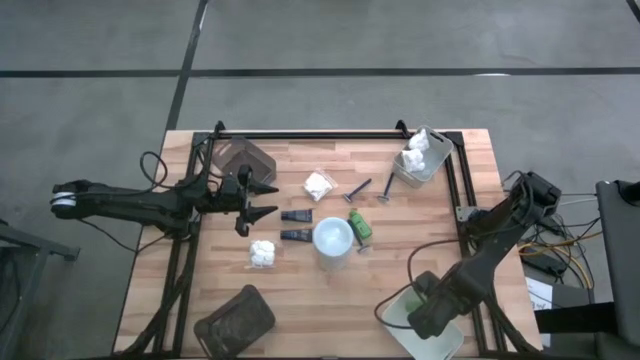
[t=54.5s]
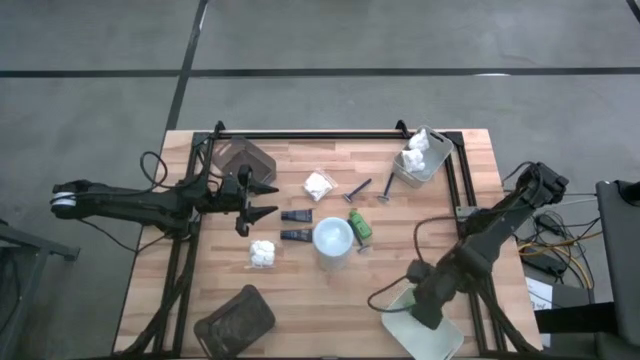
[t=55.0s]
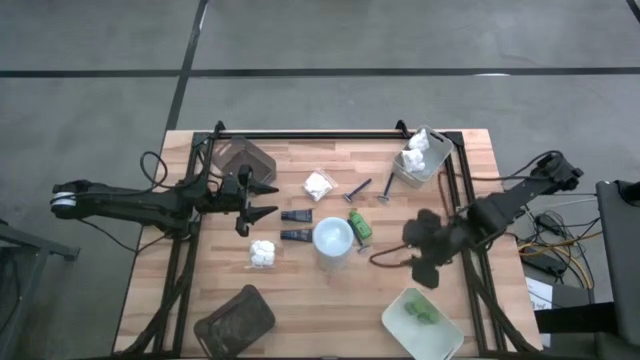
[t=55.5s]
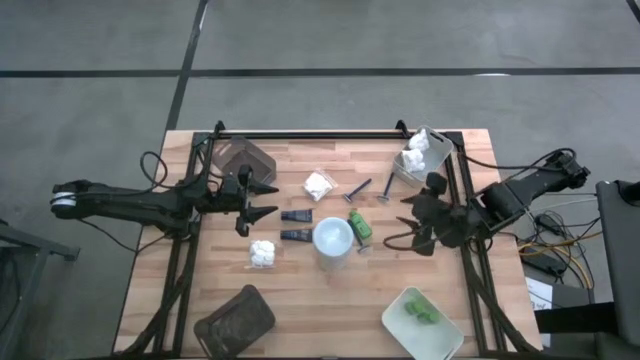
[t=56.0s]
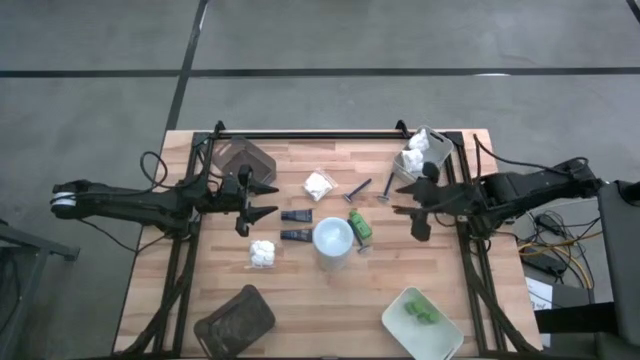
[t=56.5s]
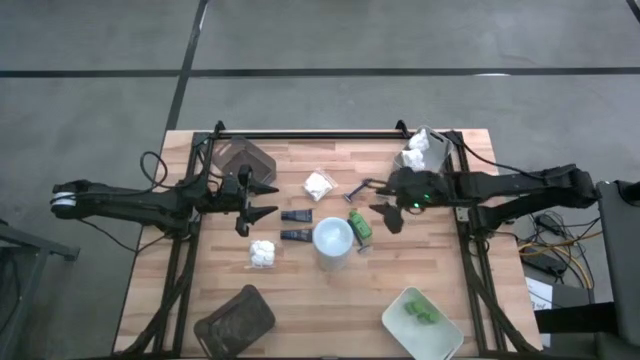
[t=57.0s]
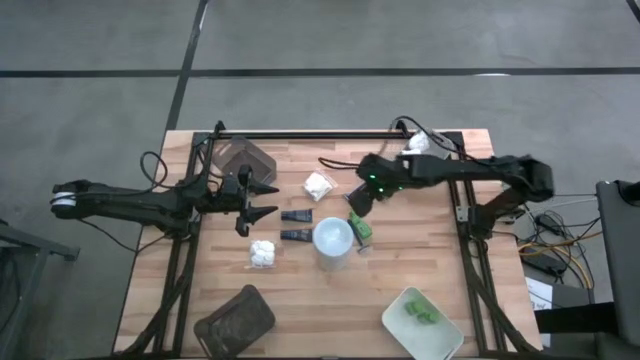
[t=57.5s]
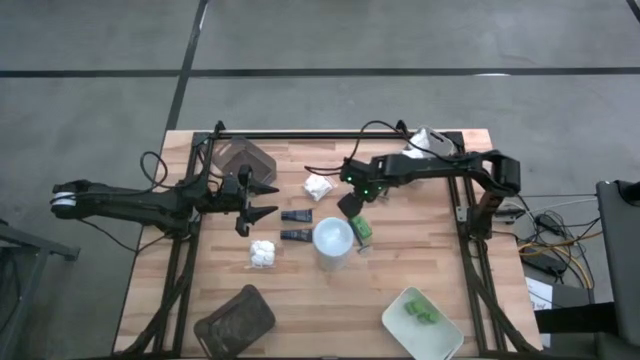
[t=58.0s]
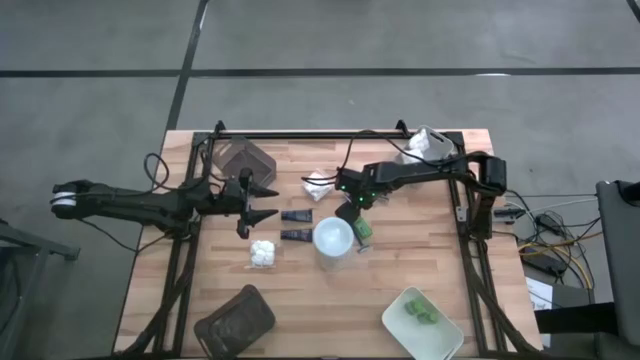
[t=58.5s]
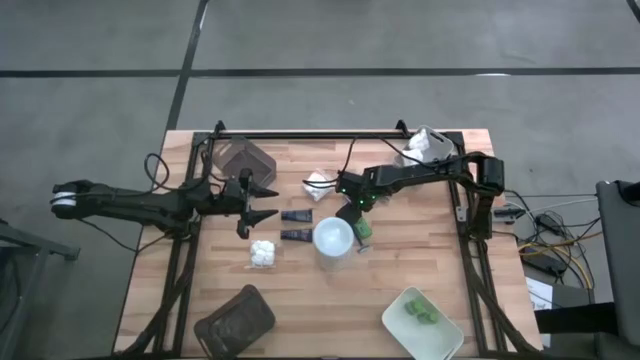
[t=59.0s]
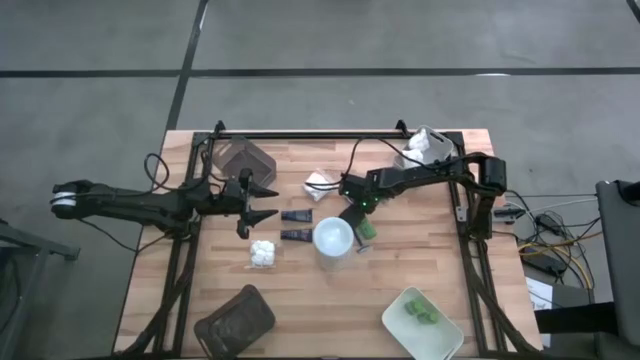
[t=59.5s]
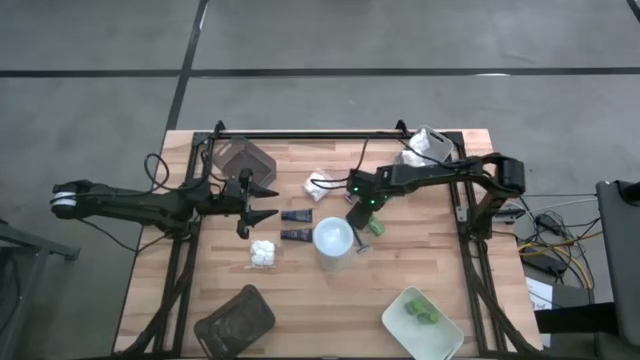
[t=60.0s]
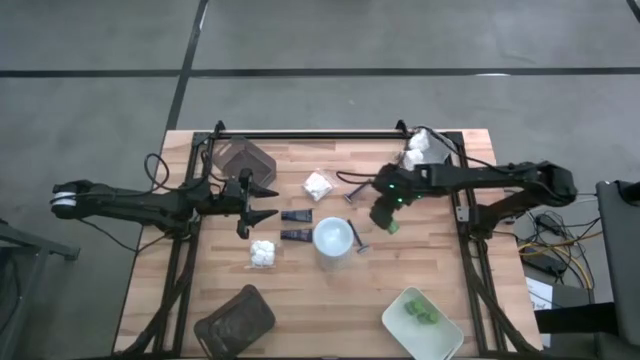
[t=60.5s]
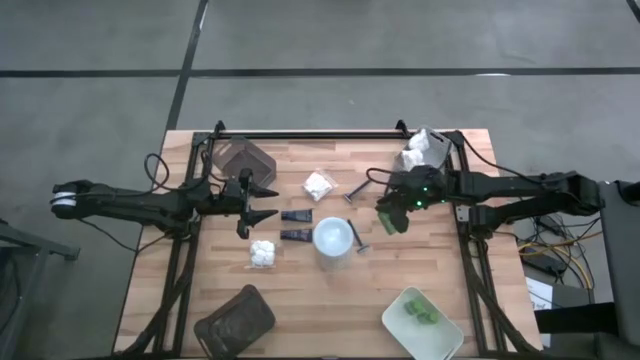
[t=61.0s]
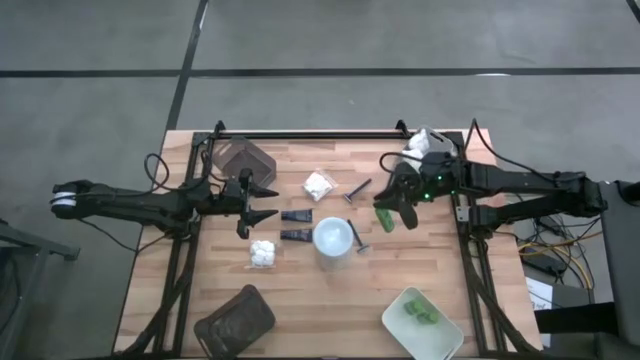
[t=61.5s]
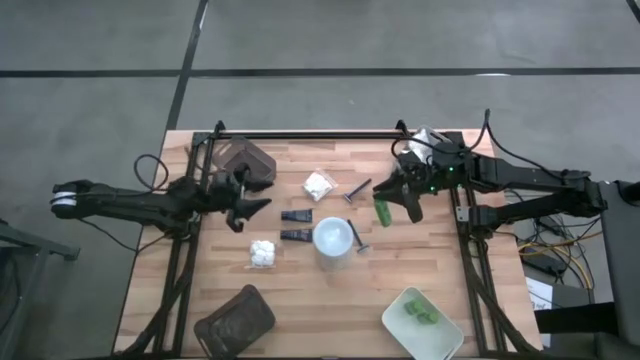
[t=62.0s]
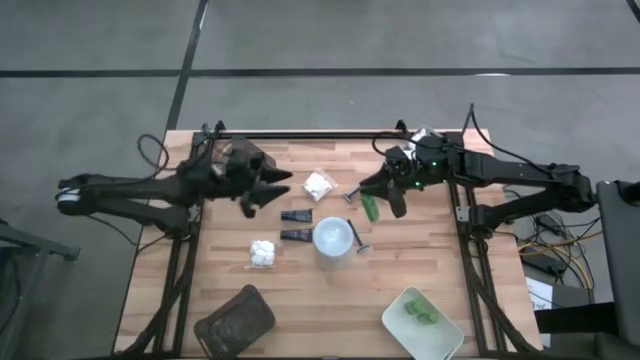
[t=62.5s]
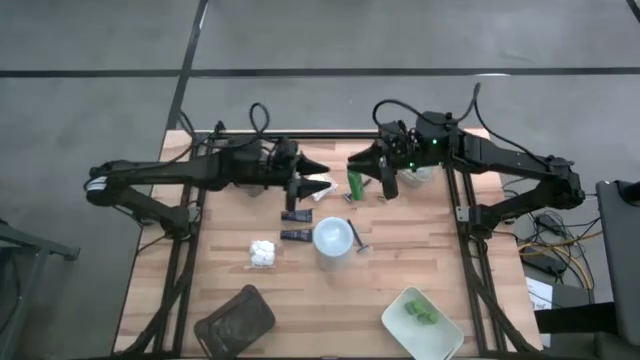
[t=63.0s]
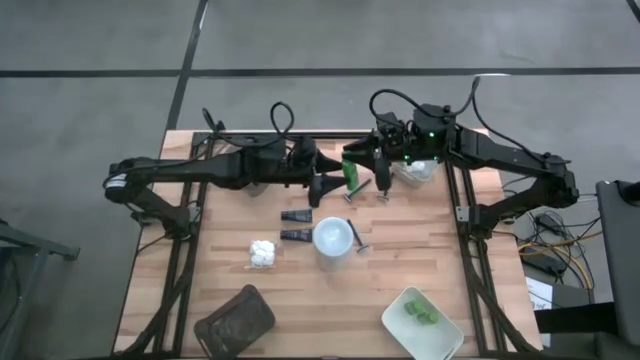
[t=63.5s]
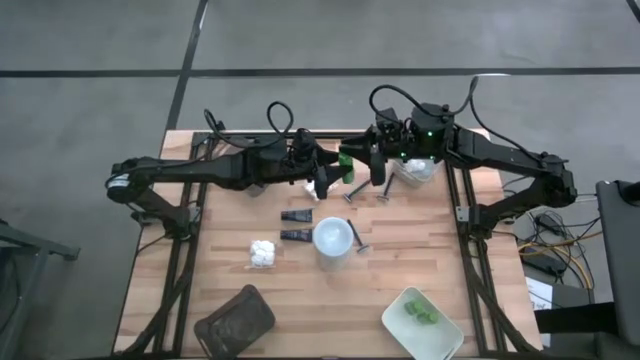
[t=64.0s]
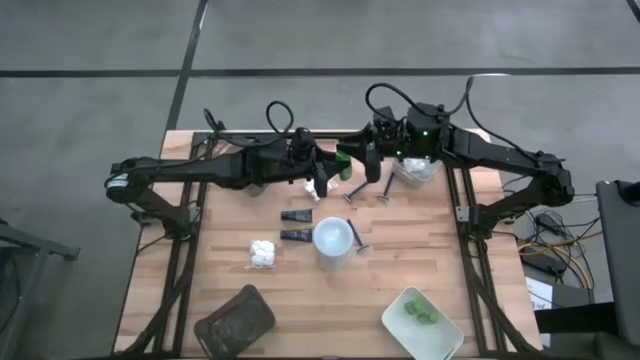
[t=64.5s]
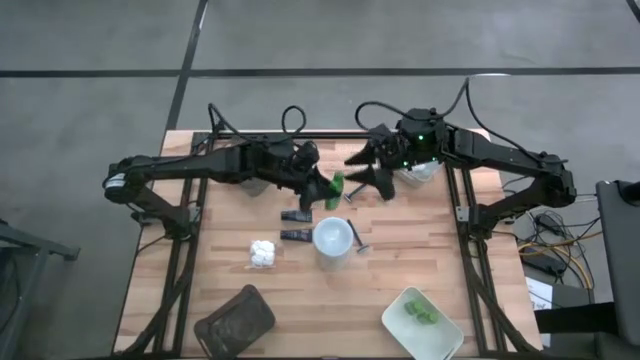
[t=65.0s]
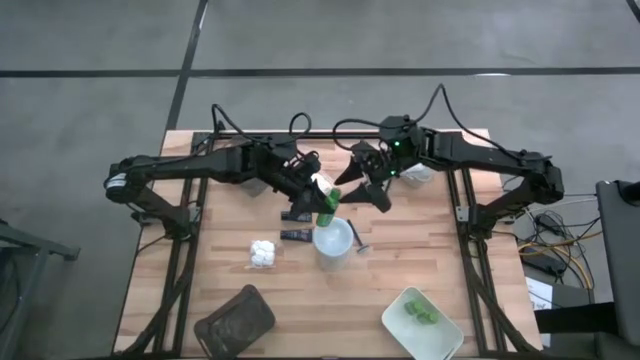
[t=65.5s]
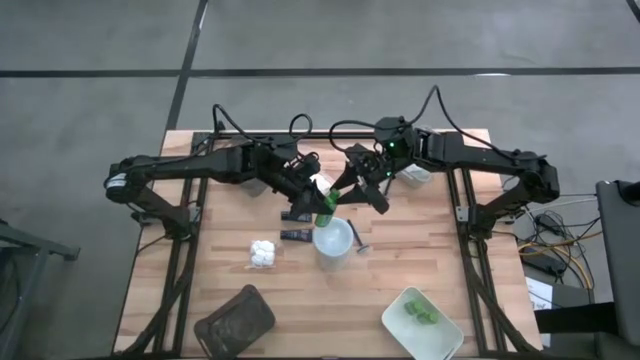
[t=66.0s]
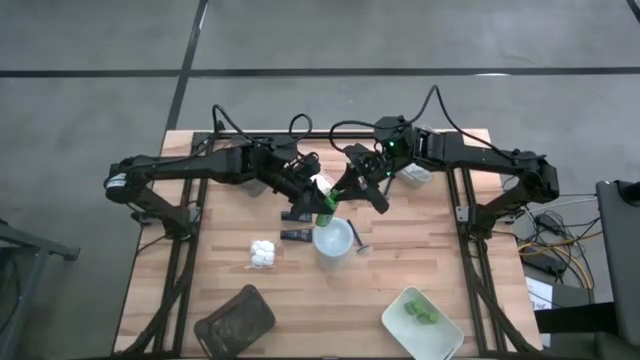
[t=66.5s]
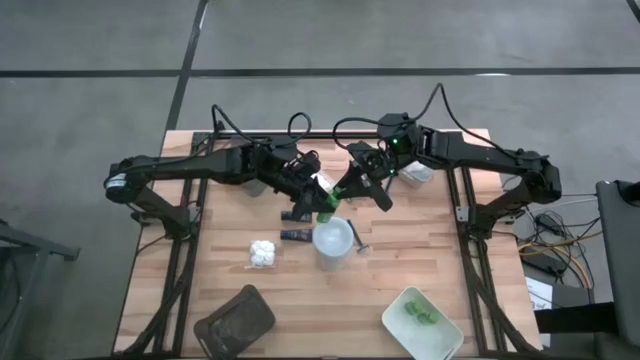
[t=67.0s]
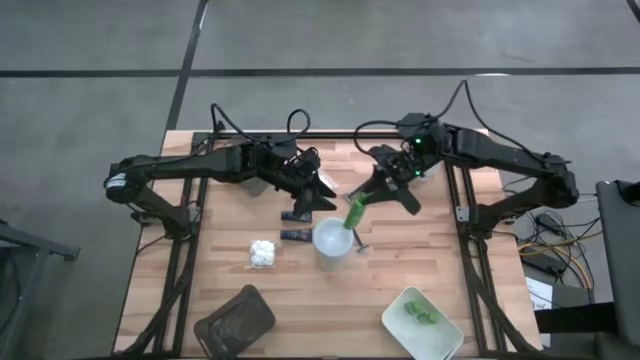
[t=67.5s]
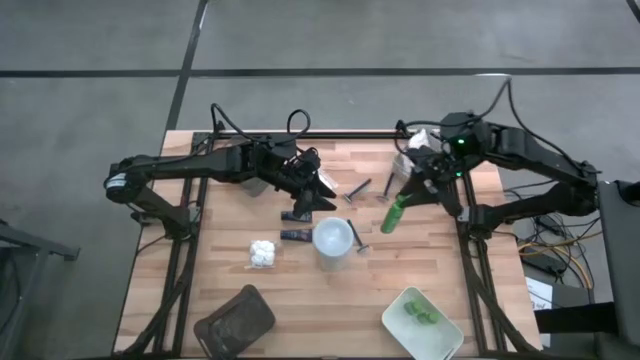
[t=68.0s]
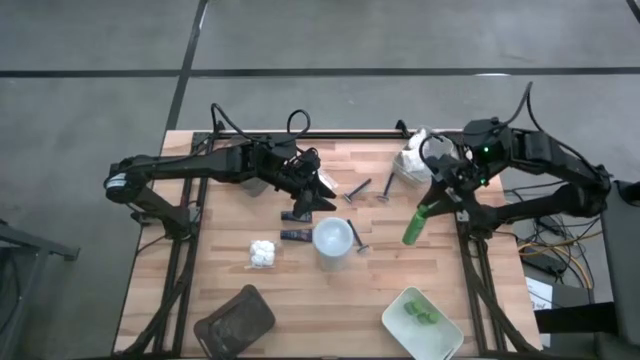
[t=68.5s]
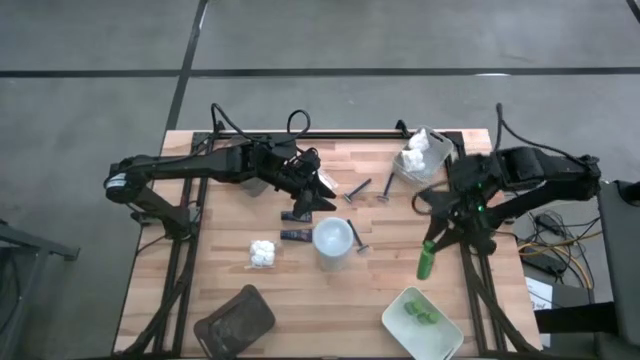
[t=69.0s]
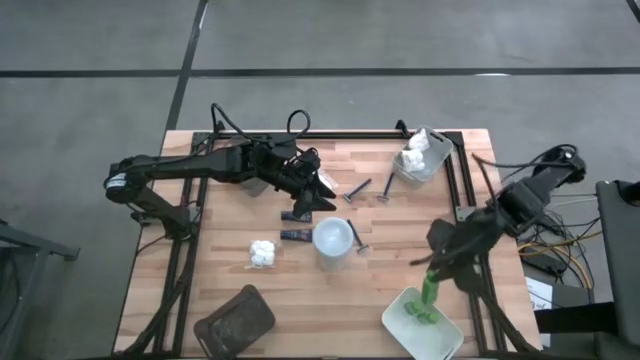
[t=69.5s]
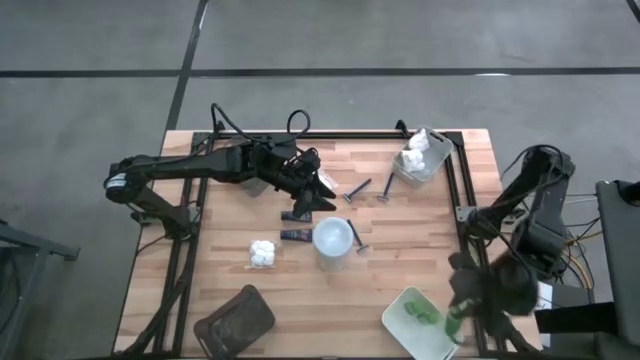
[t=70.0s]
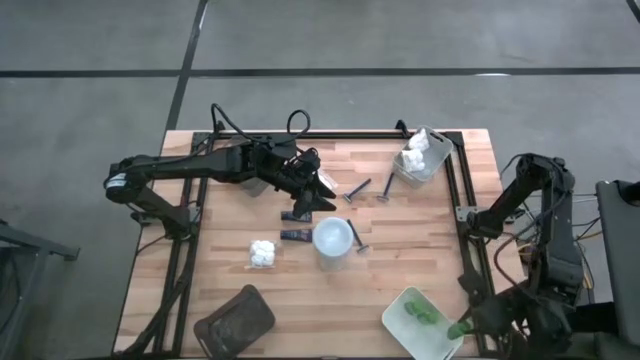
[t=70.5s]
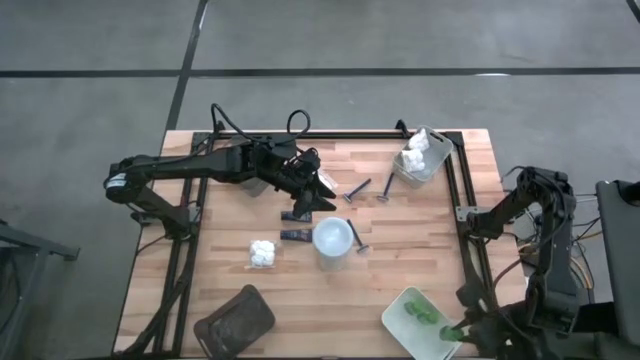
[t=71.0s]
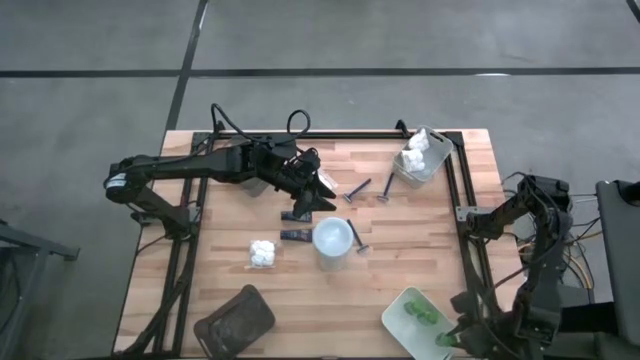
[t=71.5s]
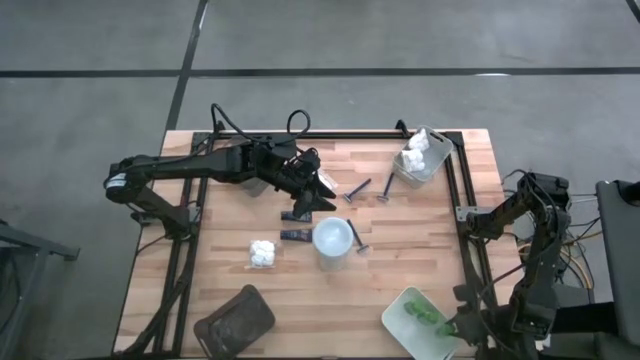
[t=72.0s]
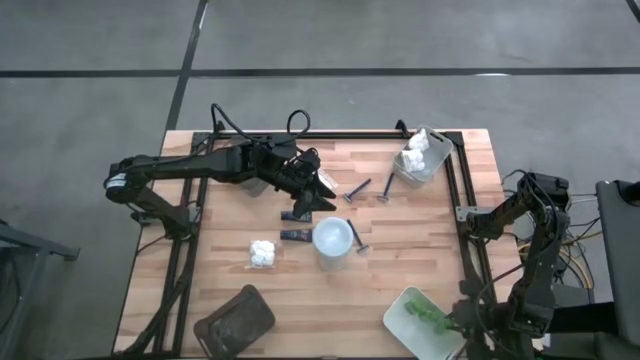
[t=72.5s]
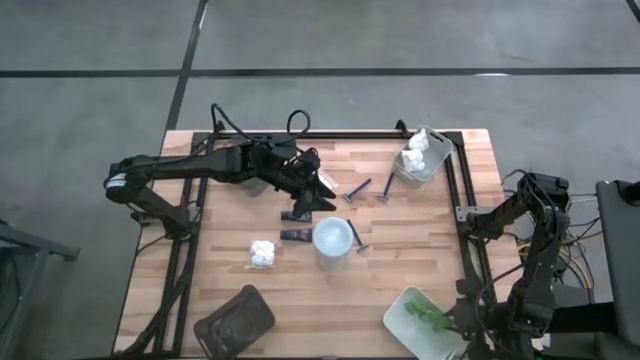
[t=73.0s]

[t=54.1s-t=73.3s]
Task: Pick & Place Travel size toiletries
Put the green shampoo into the white bin

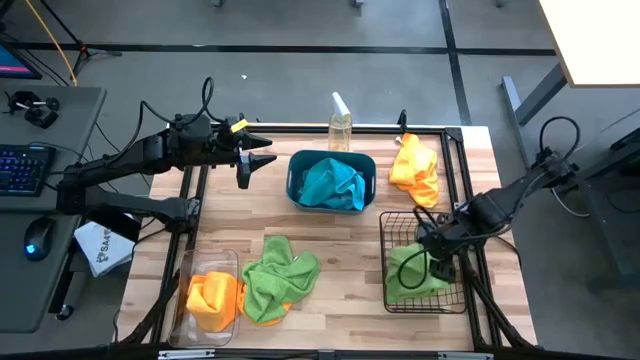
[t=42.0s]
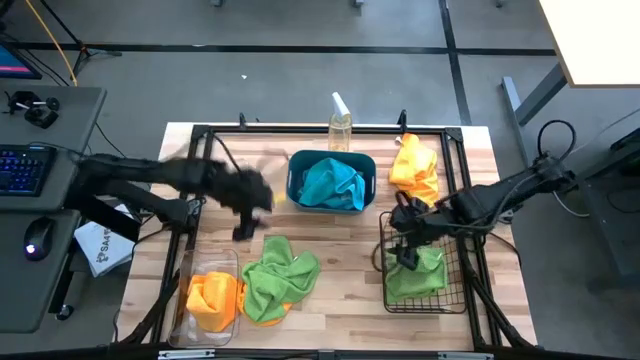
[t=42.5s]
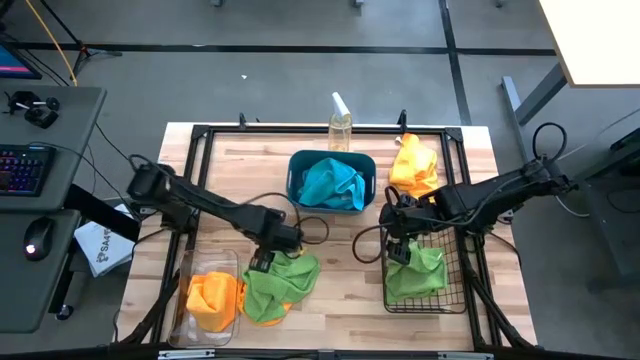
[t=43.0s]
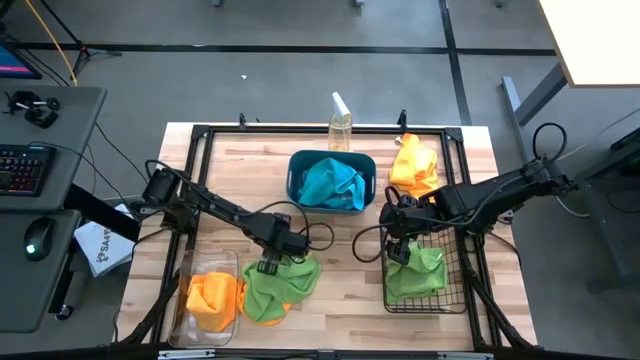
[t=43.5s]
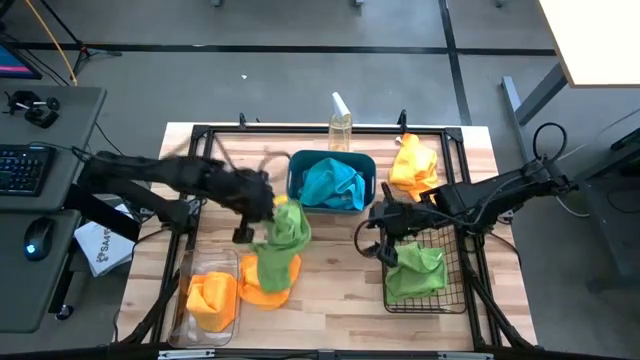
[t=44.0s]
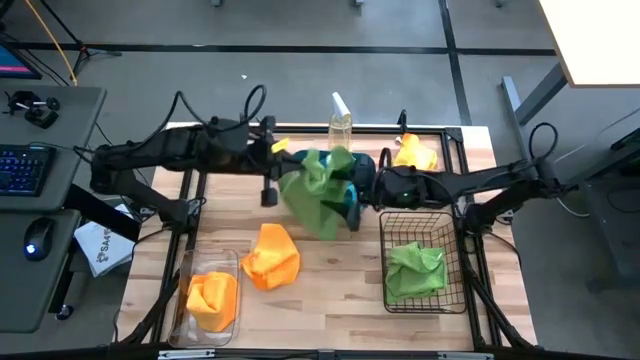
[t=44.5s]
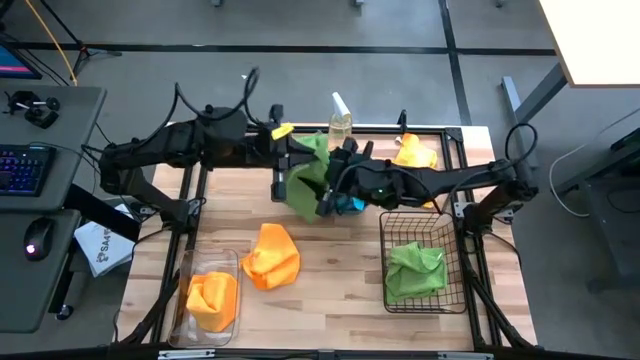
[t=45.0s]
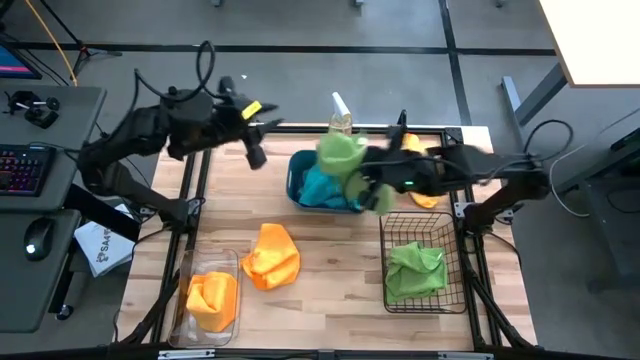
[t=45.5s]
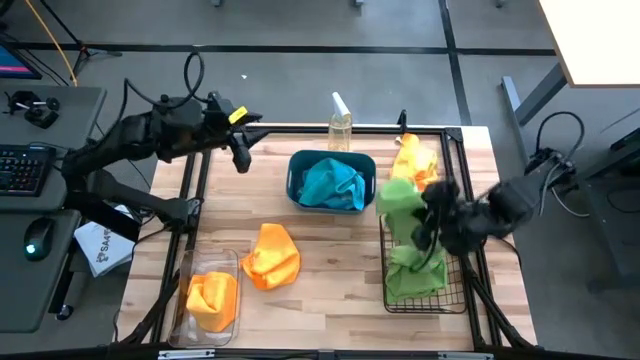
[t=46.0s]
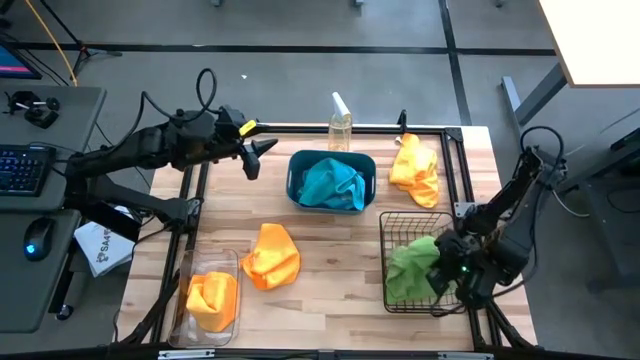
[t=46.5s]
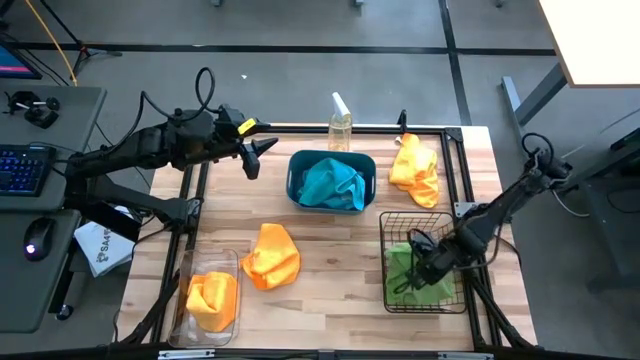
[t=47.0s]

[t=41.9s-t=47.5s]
Task: Sort microfiber towel by color & place in baskets
Put the green towel into the black wire basket
